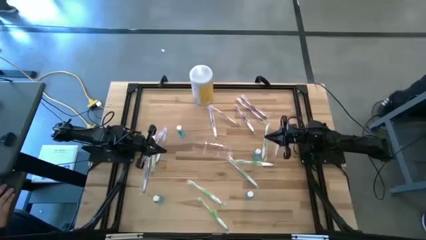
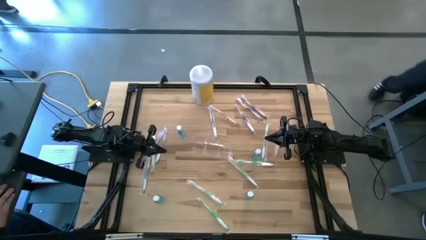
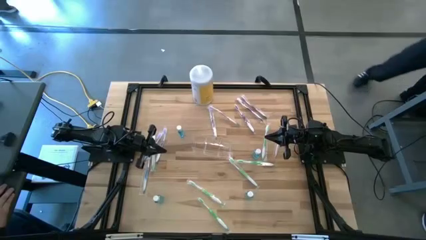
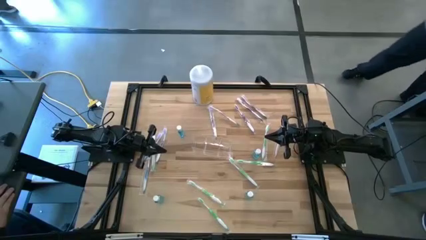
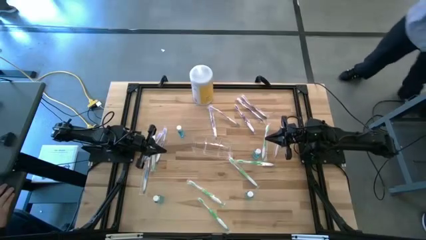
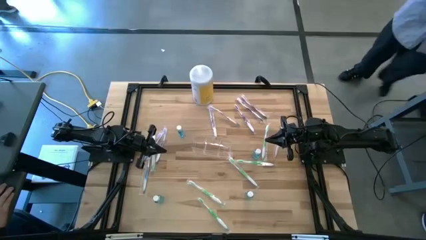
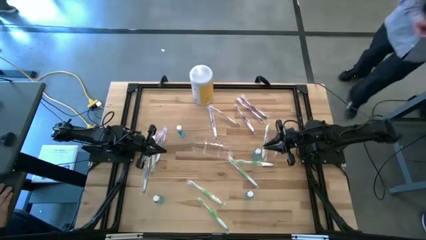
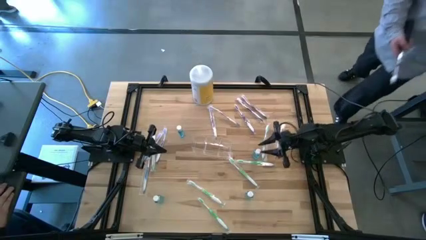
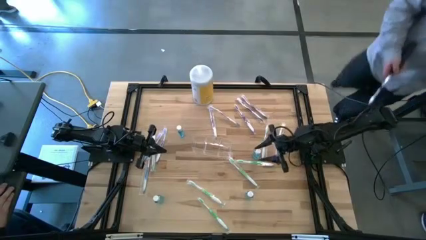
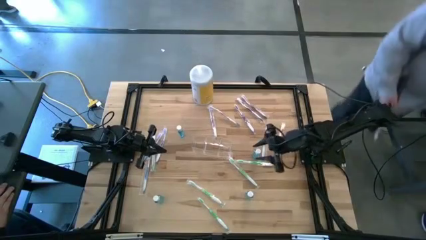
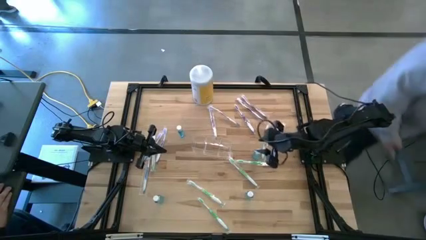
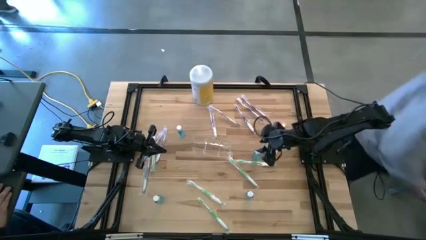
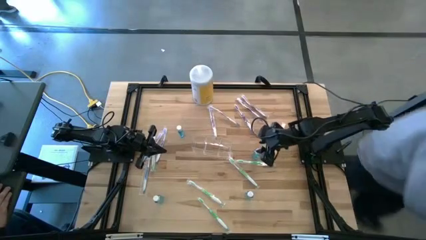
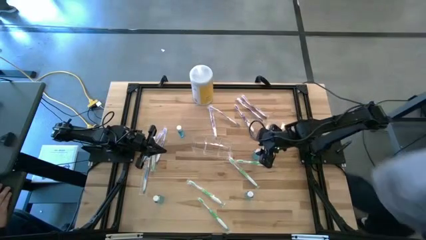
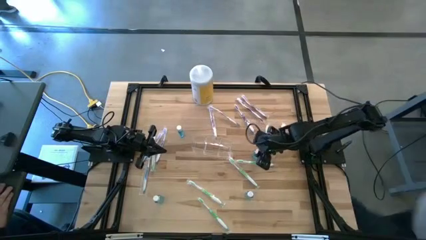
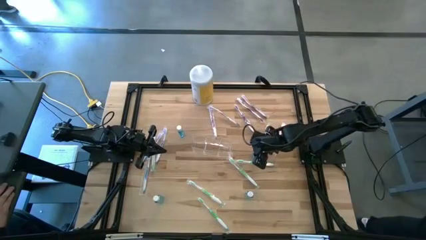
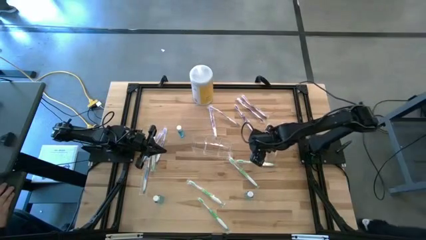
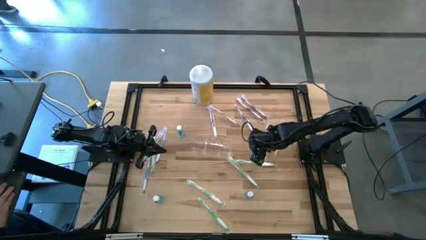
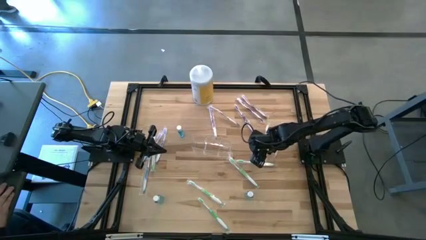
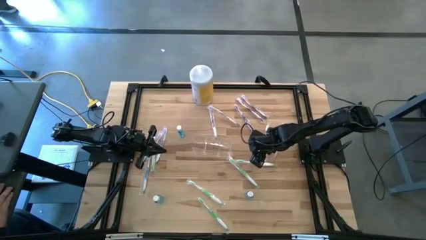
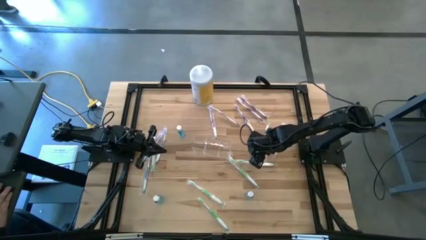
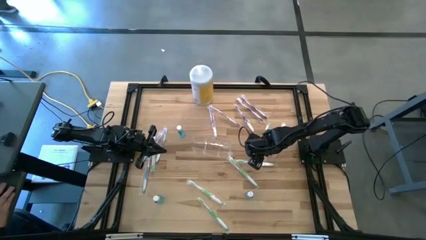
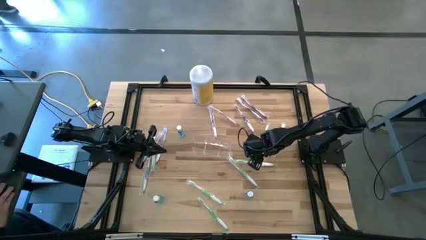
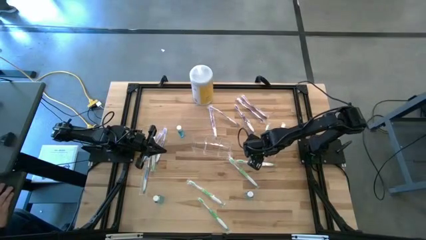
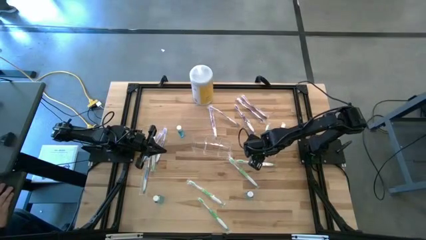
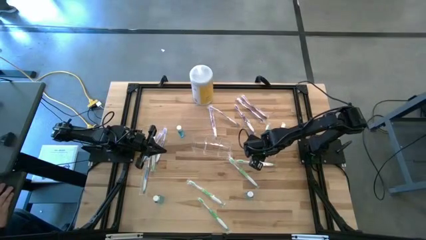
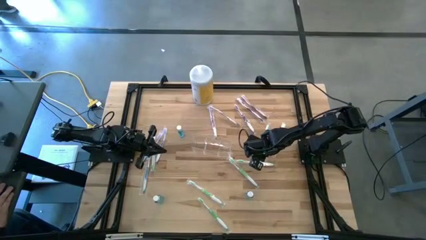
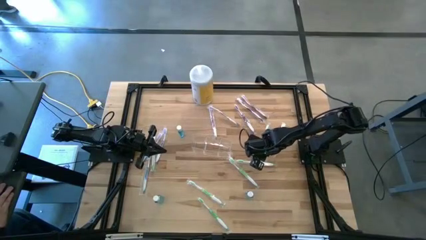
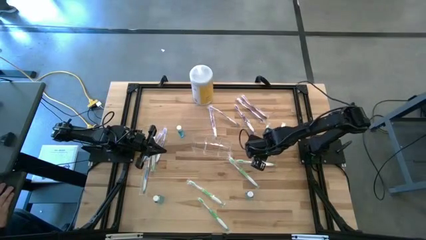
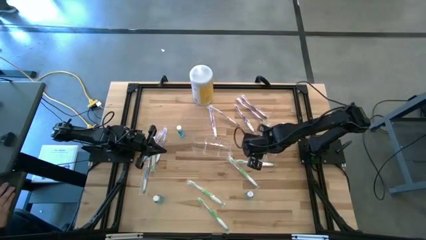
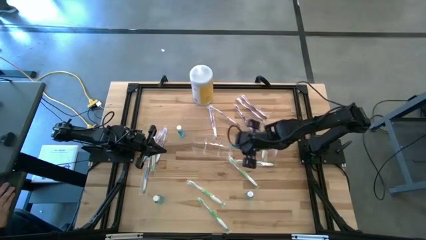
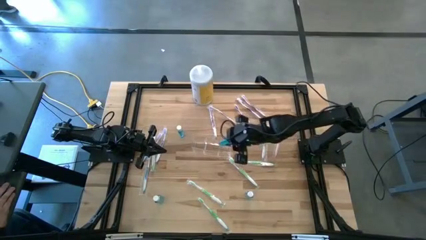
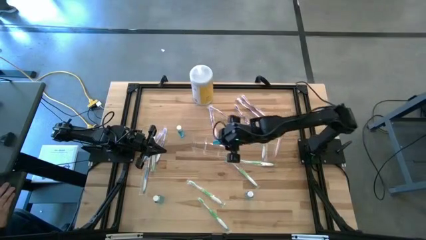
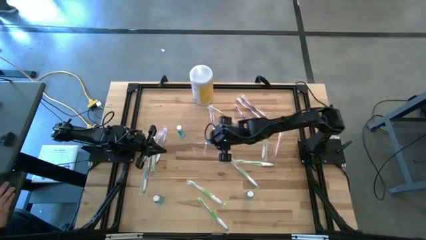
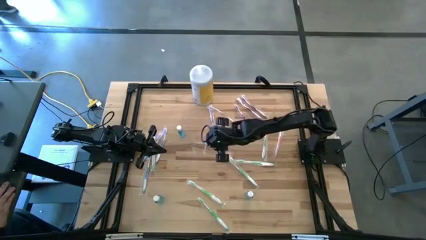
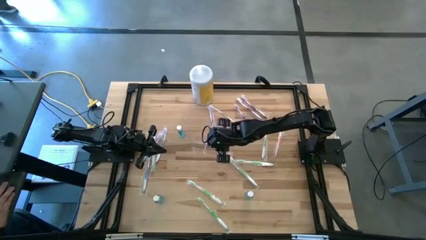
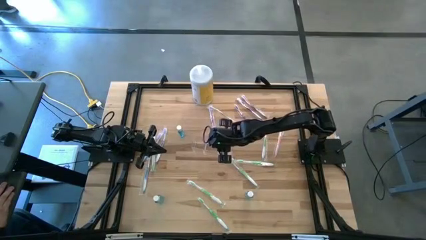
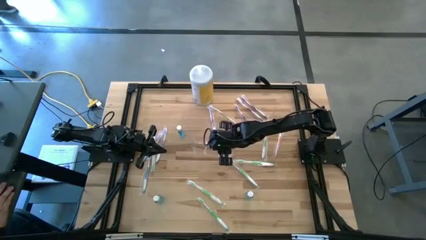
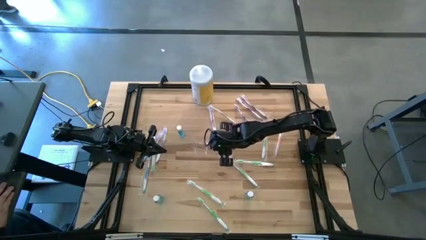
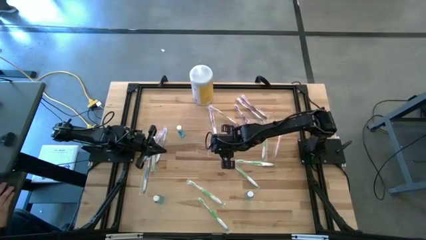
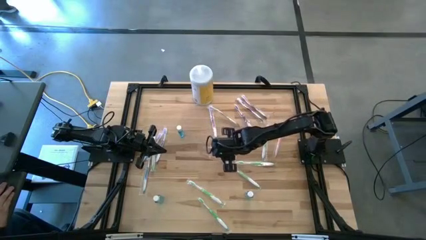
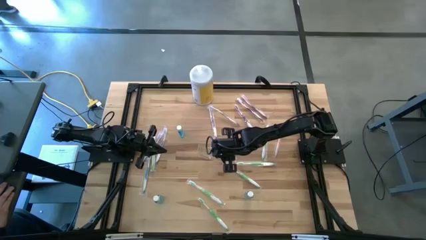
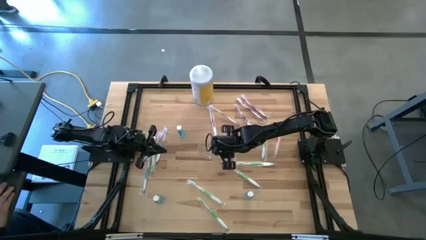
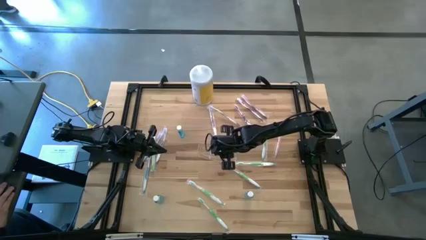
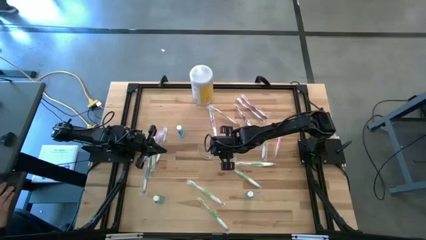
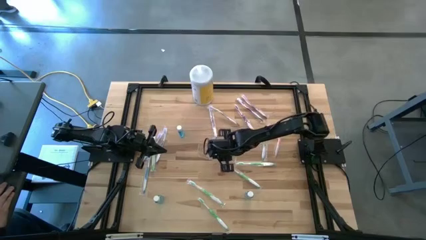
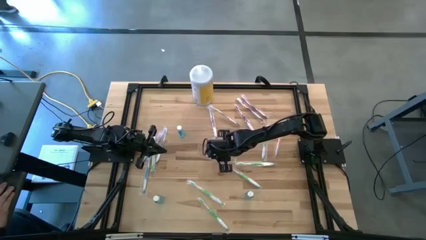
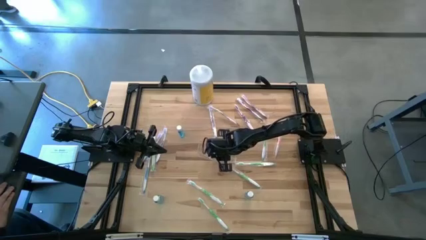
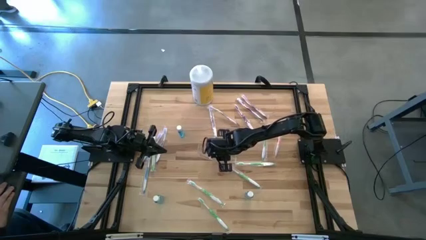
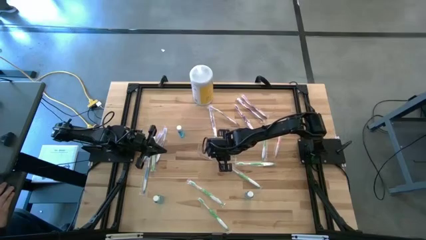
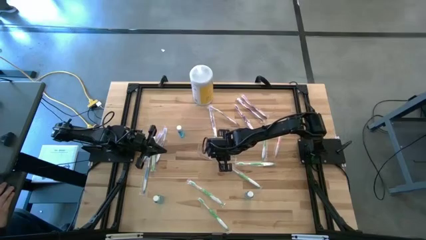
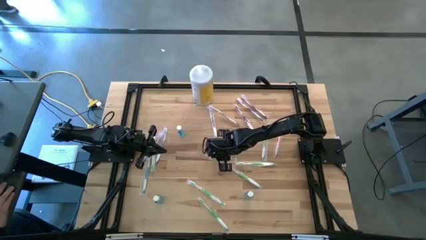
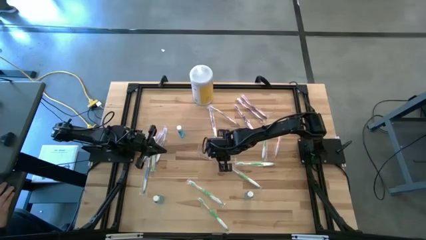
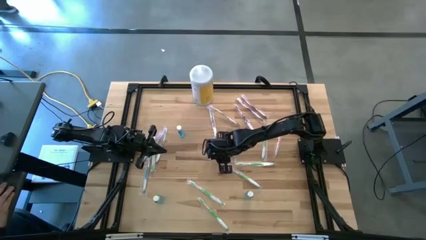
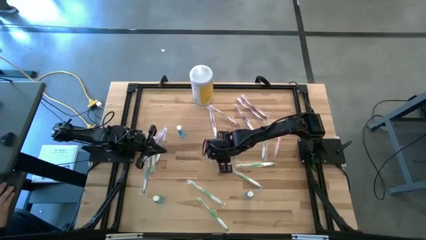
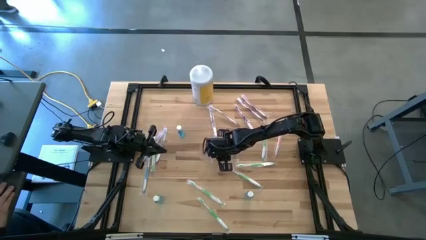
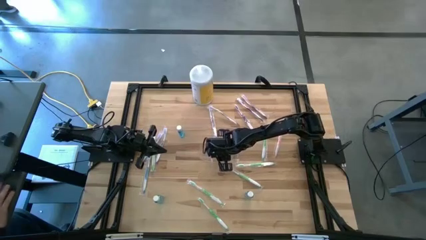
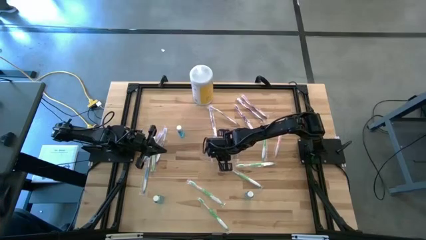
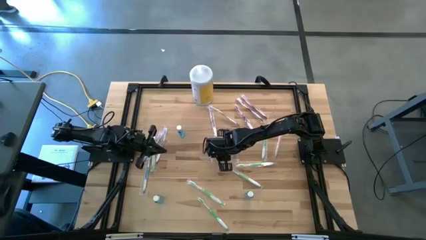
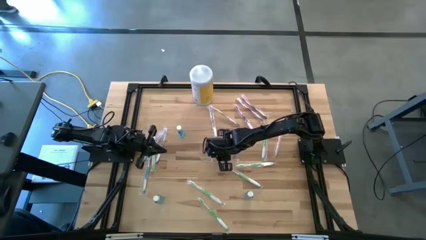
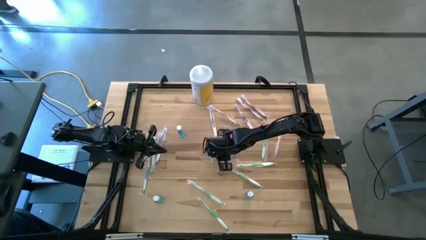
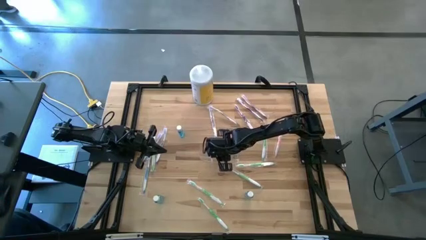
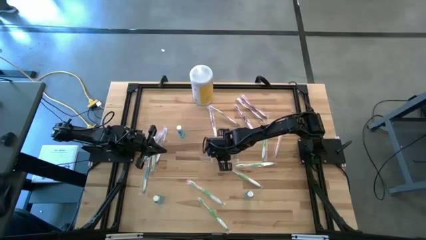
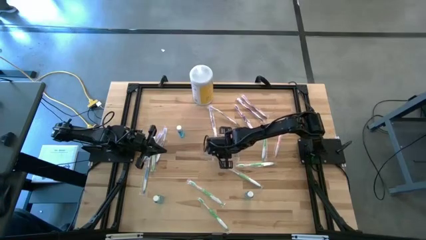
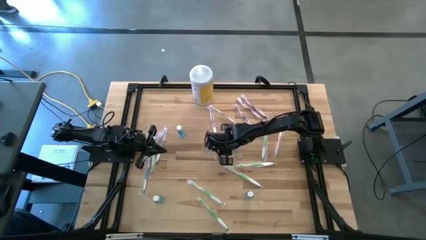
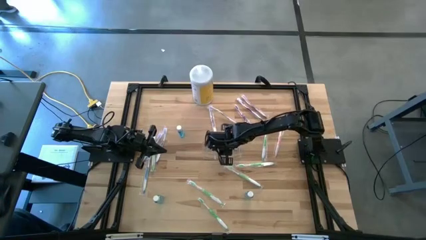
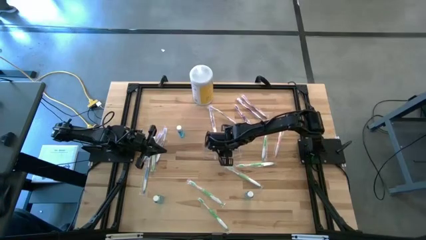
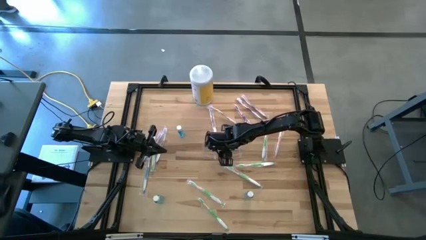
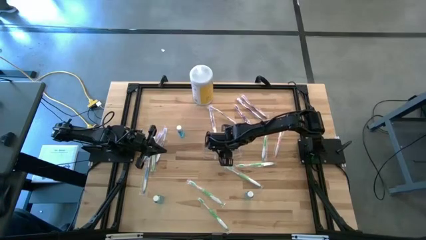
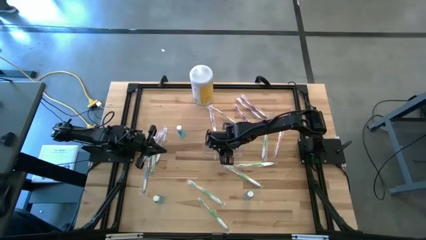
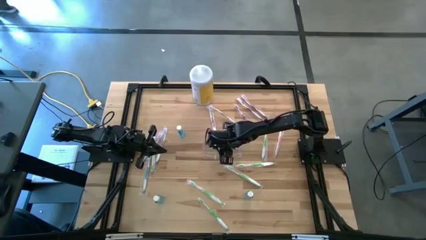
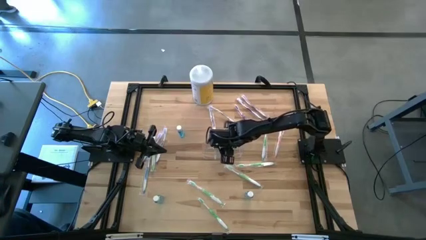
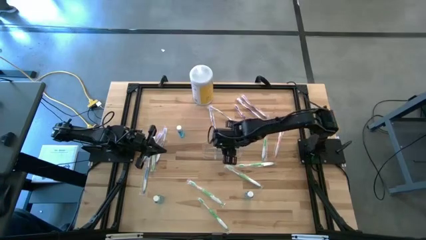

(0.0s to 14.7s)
Task: Pick & Place toothbrushing station
Put the mouthwash bottle into the transparent organizer
